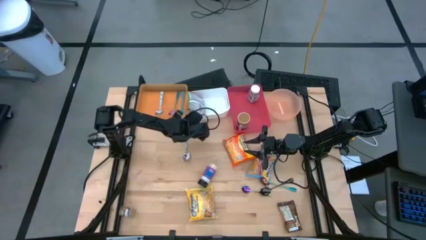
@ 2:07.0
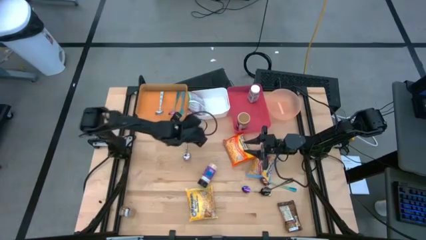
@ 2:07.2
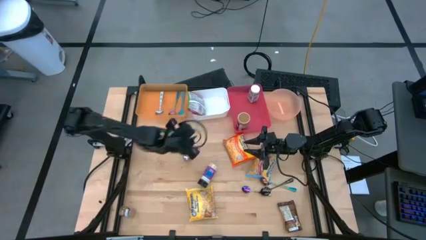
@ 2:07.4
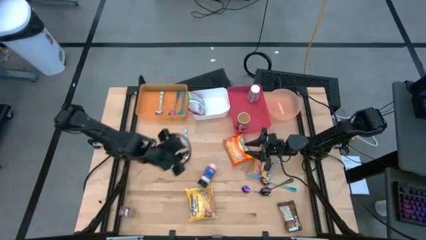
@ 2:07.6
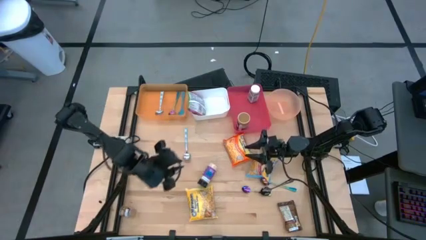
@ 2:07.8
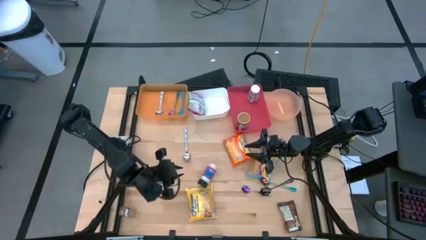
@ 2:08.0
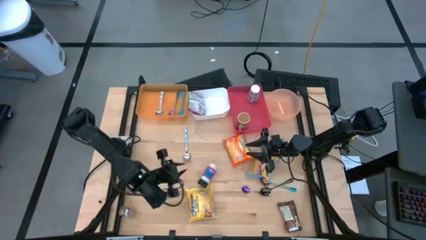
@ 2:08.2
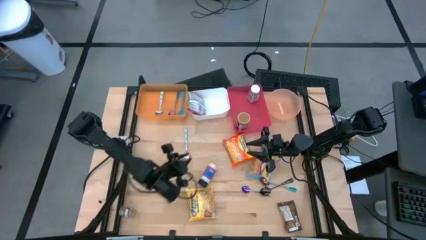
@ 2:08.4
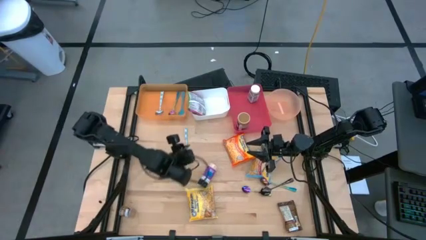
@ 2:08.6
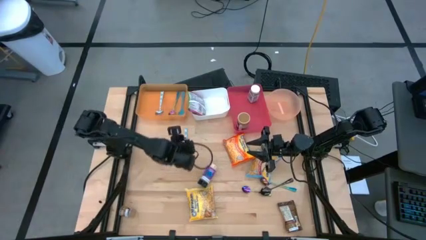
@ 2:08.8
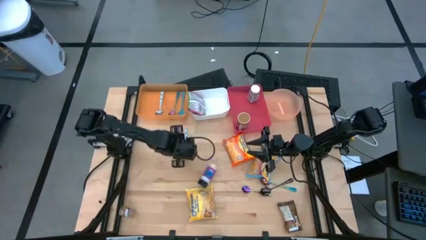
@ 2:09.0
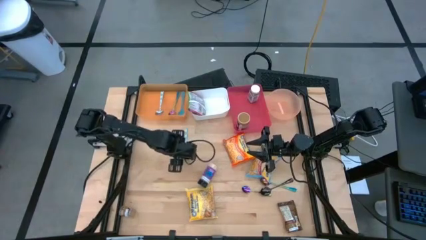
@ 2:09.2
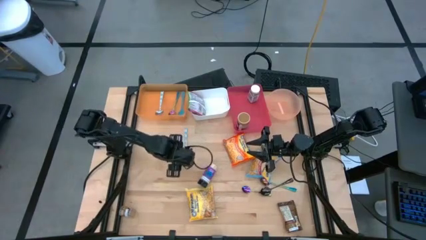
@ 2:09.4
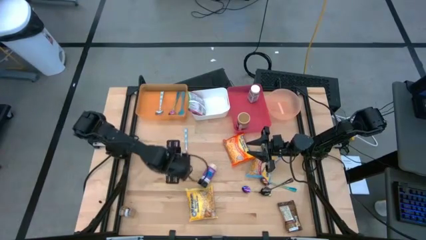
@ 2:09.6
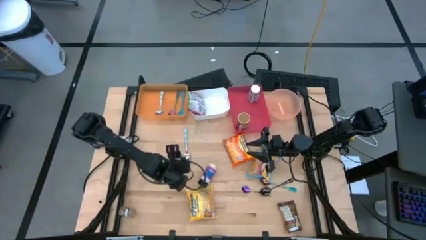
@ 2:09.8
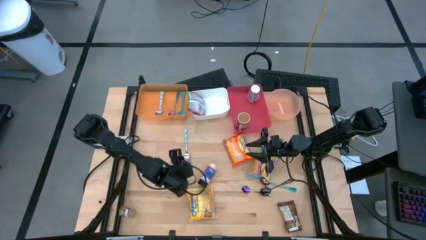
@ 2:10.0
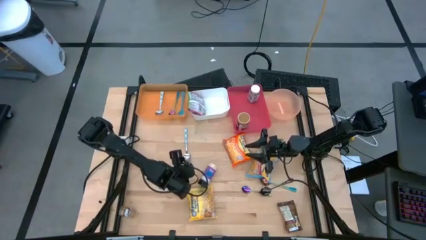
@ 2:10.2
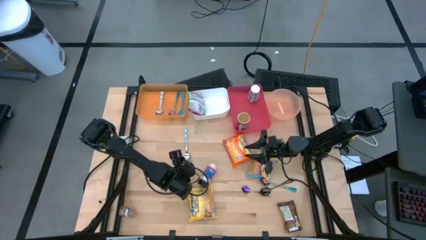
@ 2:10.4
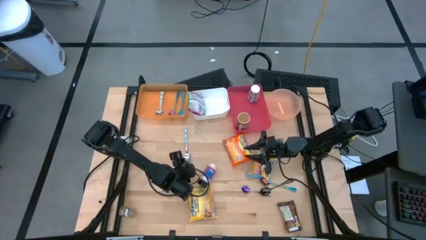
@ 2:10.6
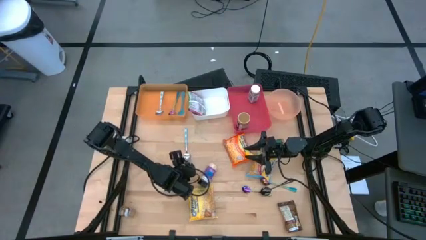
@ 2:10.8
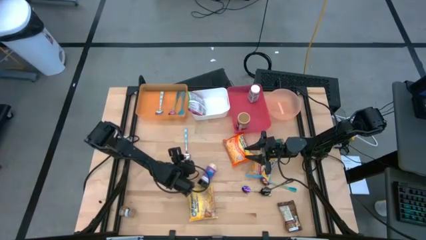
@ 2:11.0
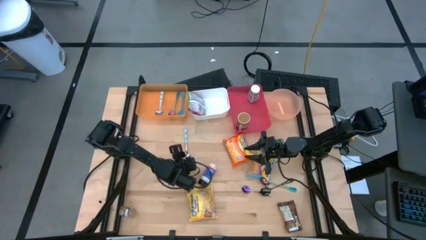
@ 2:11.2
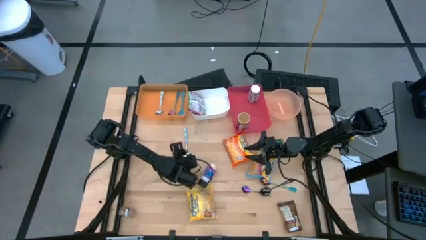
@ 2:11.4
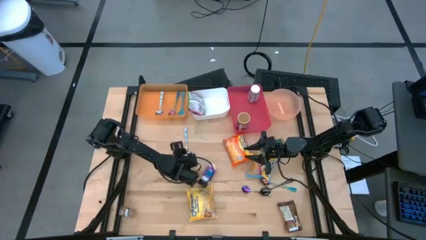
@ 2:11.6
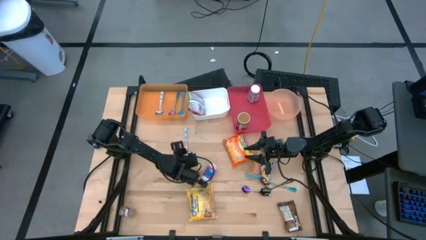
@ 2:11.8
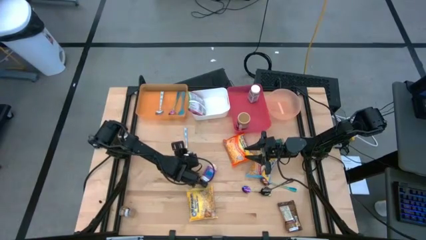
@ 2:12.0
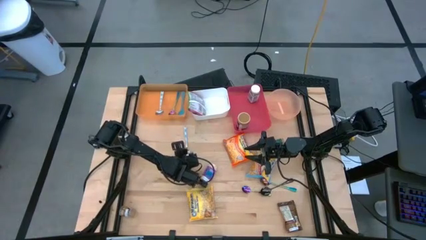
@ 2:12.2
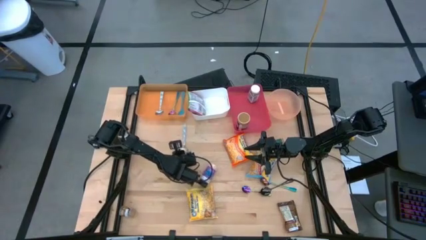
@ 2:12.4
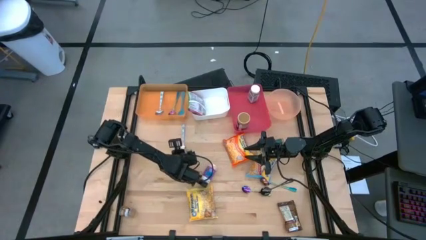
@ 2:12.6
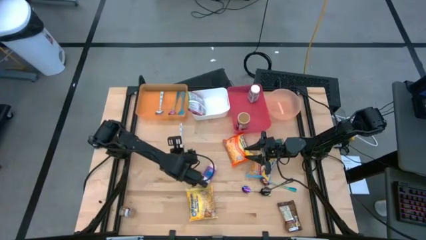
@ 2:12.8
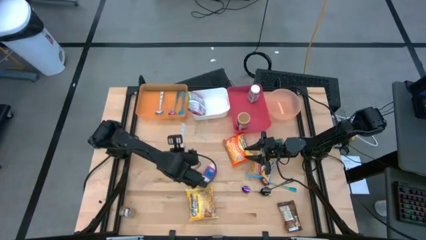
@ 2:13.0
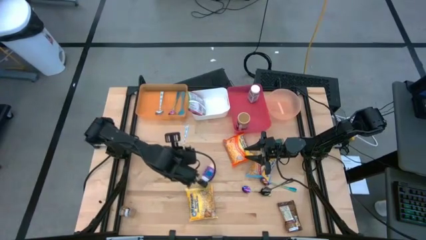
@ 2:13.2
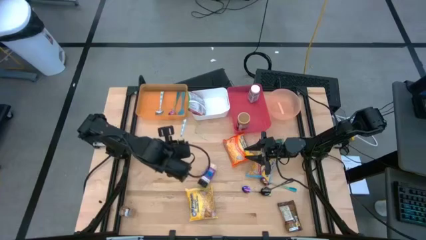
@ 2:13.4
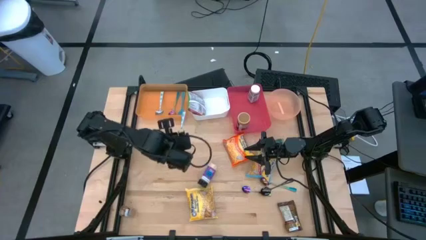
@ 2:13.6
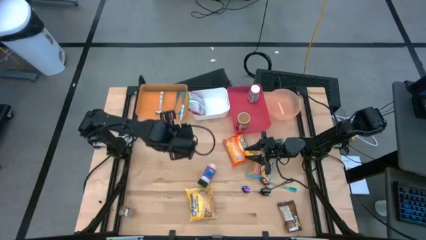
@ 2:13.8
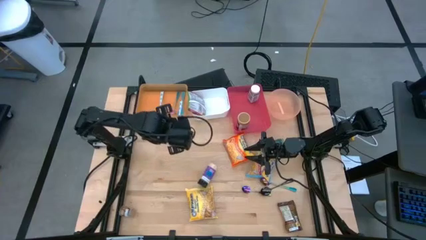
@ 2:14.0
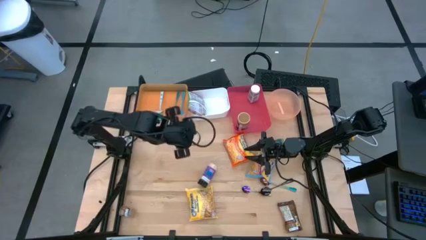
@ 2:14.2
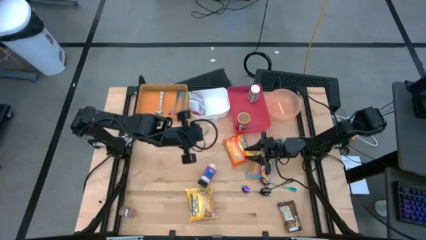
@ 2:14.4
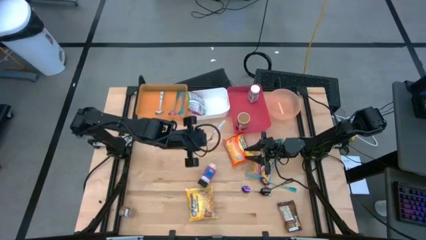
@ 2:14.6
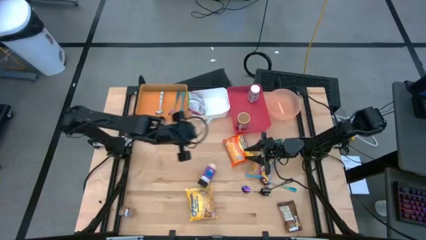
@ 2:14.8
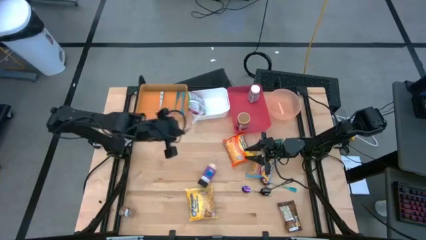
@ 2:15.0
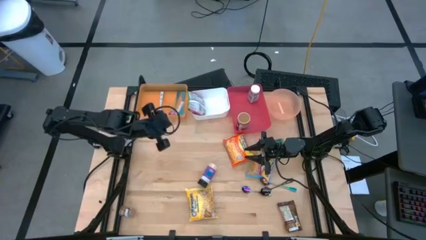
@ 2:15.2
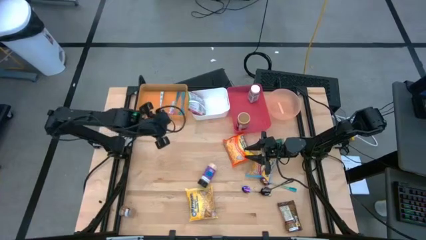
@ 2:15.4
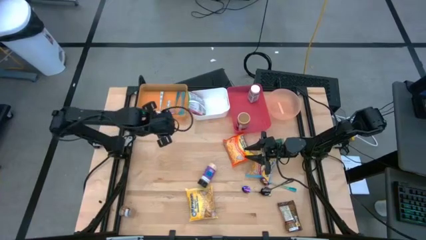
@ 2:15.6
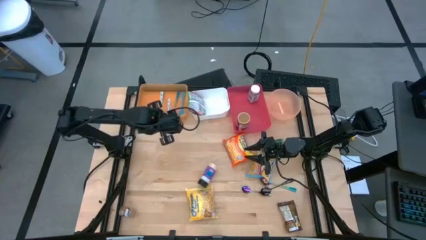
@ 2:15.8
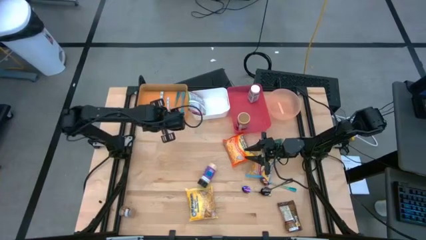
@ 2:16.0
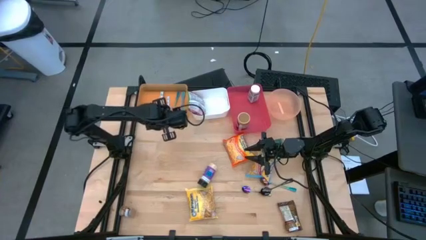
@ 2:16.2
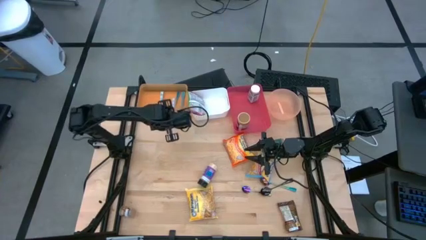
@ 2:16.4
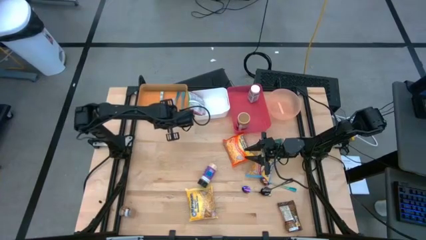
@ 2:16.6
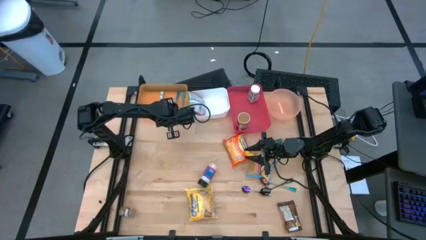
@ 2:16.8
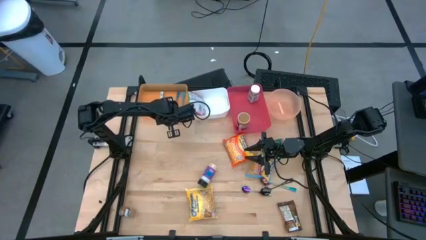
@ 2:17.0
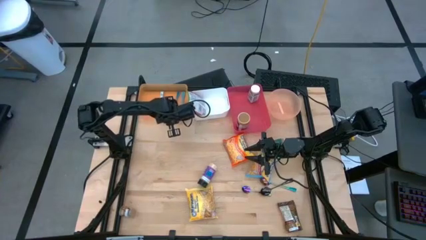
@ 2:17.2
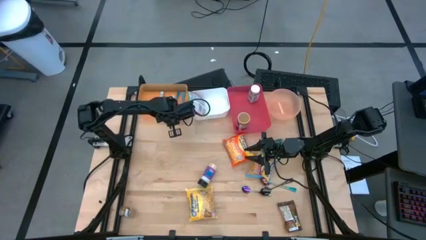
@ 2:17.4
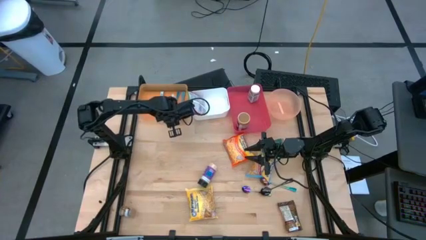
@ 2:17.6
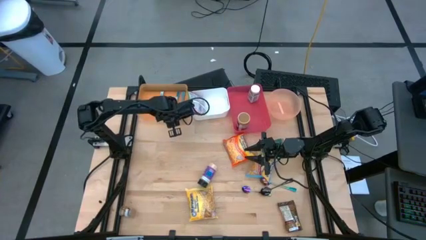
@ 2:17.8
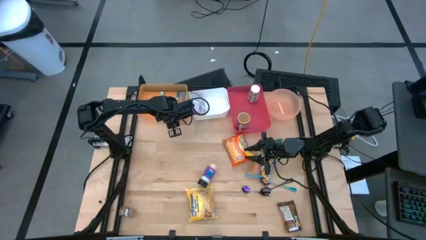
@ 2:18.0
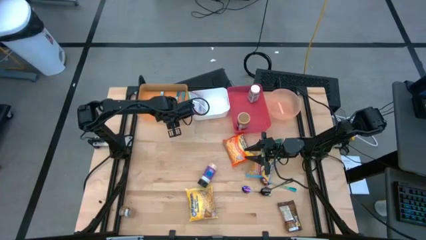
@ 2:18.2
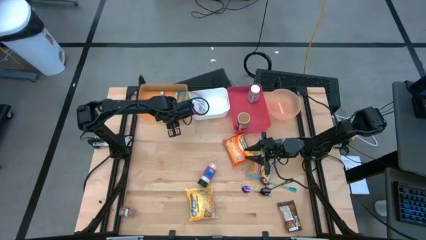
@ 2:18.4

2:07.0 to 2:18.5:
Task: Pick & Place Food Item
Put the blue patterned spoon into the orange bin

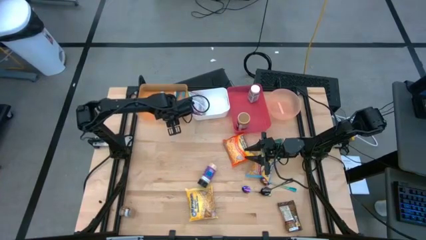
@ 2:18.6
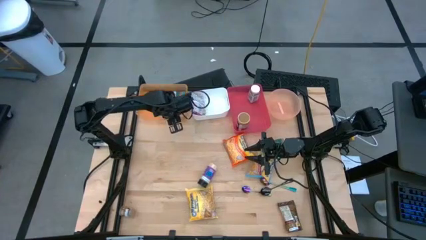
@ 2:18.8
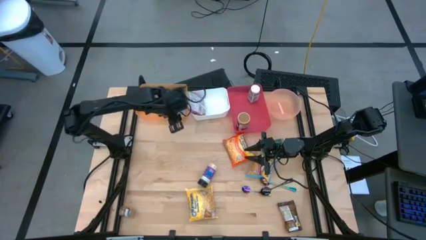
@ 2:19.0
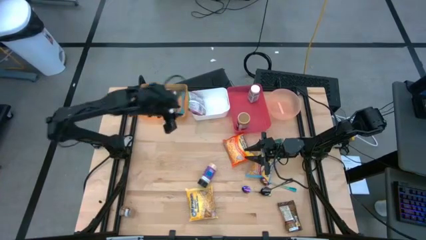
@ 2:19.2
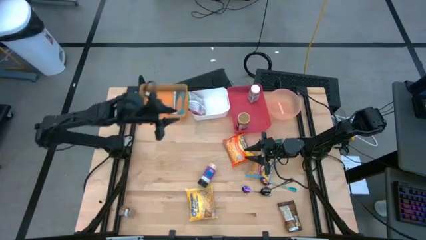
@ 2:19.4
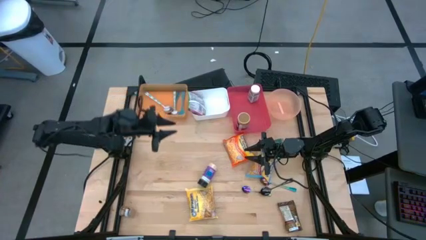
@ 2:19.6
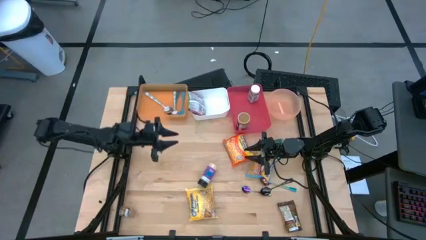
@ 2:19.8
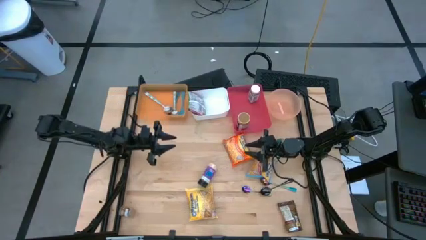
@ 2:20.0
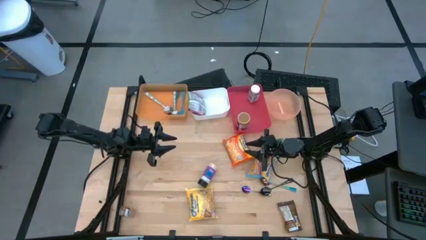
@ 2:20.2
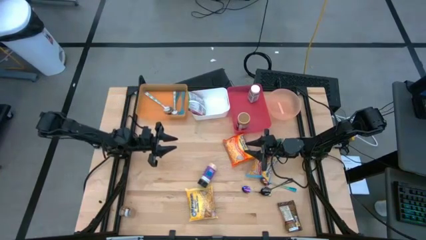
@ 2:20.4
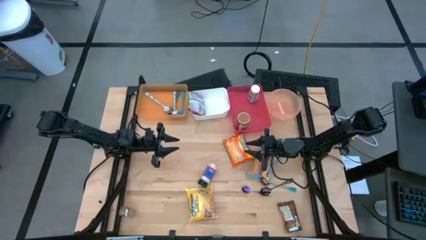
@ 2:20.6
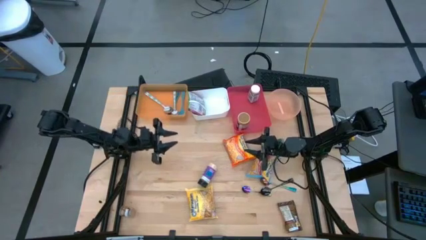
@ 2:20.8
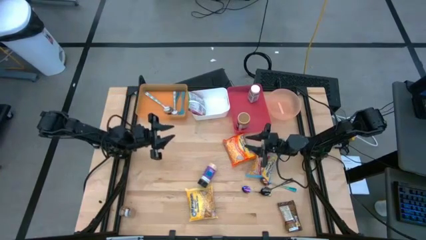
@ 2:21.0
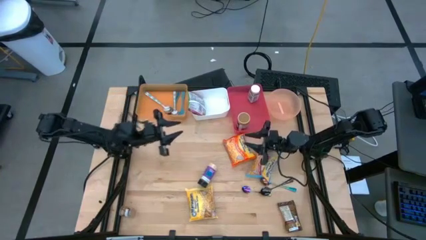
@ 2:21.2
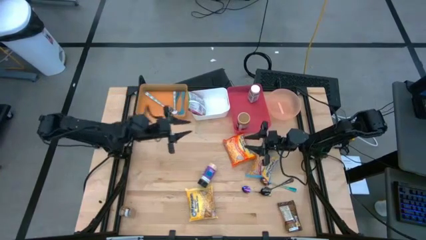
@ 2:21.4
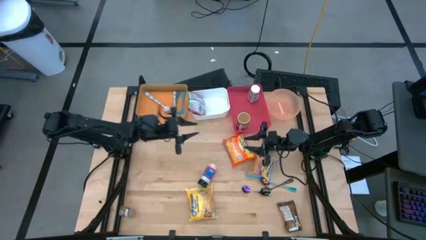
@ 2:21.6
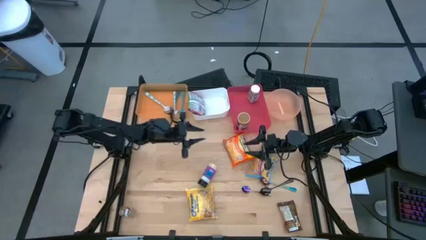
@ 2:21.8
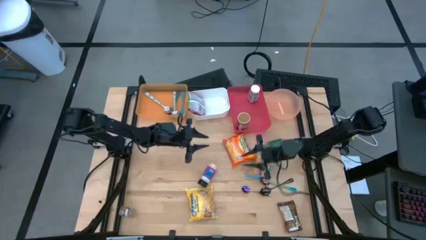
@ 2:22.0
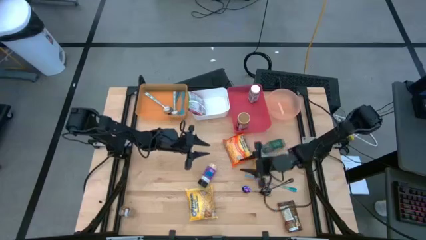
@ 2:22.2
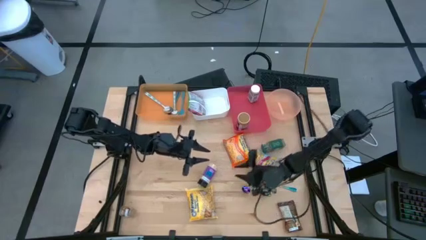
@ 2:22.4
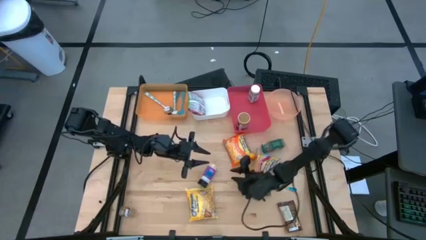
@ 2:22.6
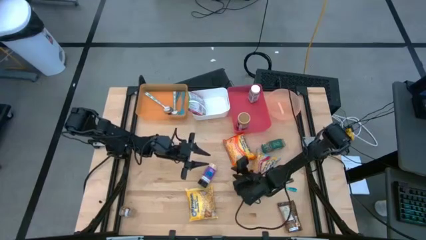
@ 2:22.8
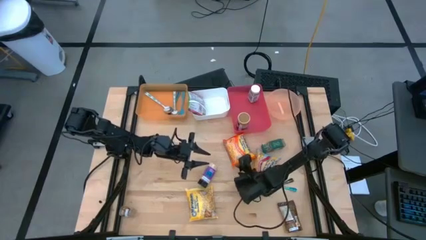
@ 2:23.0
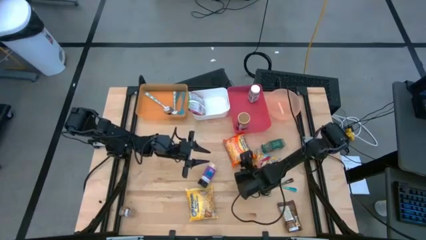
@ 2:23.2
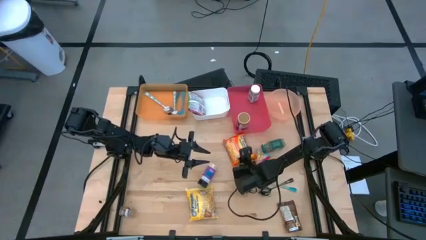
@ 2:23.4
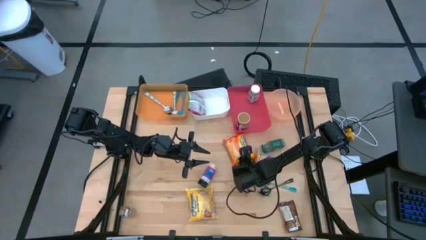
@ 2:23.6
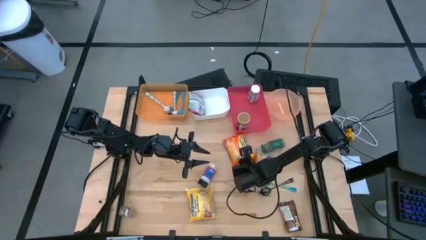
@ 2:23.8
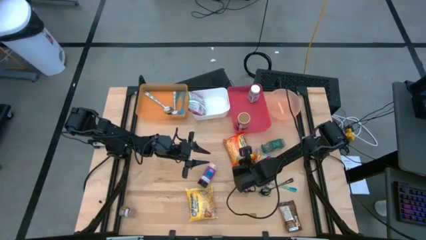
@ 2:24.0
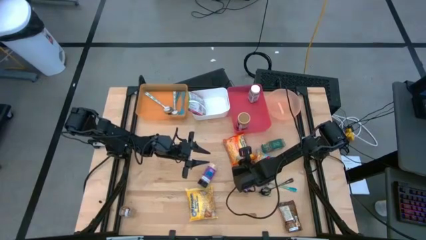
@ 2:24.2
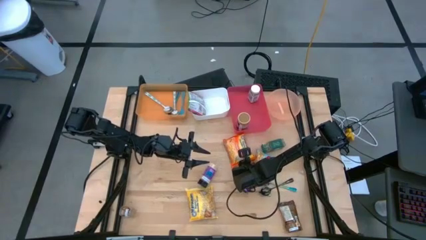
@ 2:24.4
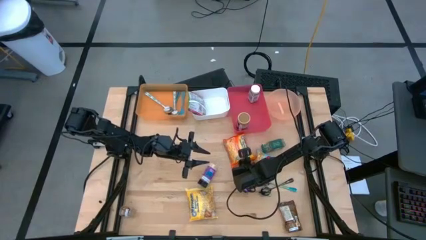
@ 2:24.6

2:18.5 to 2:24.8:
Put the orange noodle pack into the white bin
